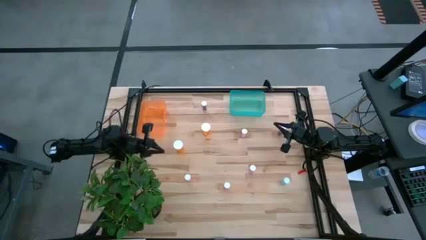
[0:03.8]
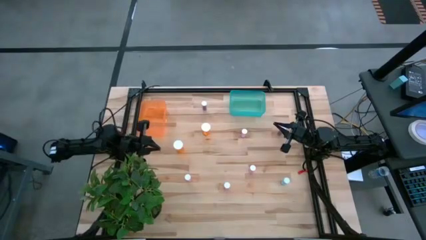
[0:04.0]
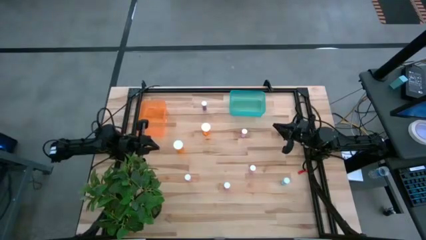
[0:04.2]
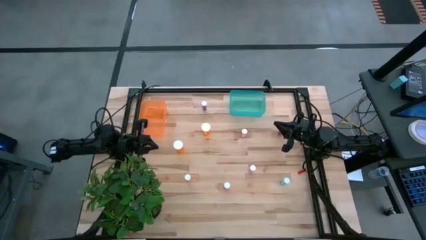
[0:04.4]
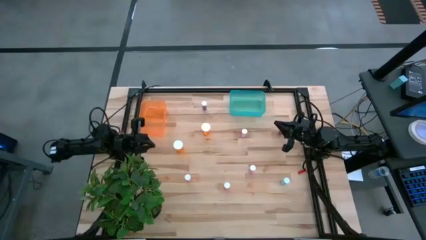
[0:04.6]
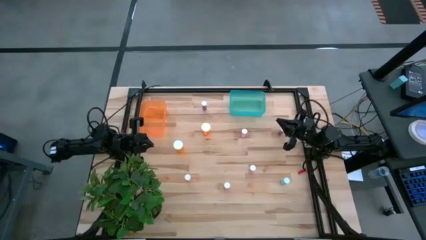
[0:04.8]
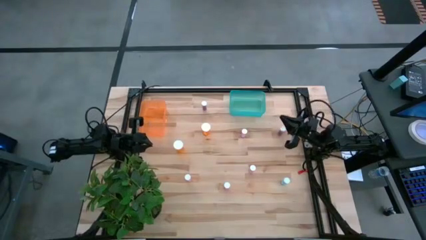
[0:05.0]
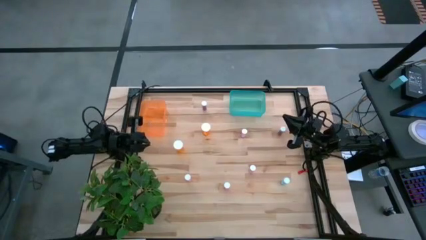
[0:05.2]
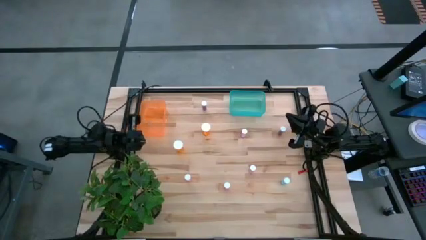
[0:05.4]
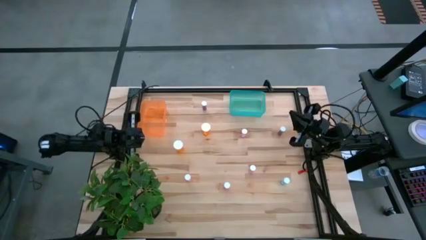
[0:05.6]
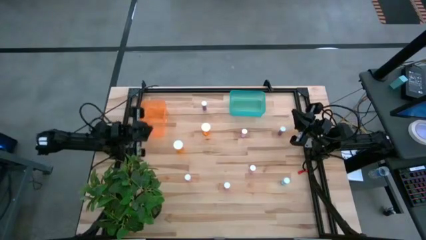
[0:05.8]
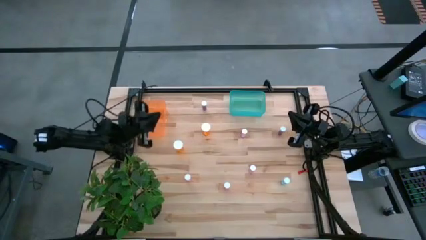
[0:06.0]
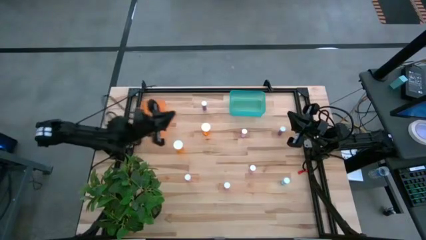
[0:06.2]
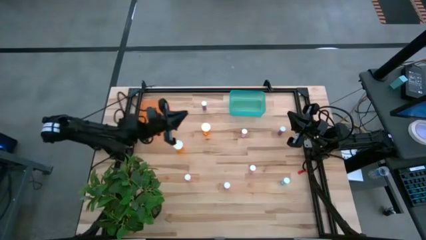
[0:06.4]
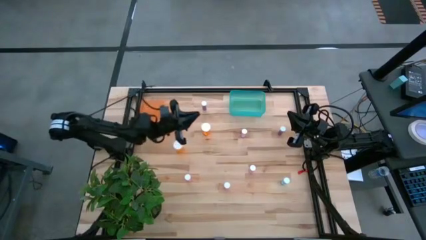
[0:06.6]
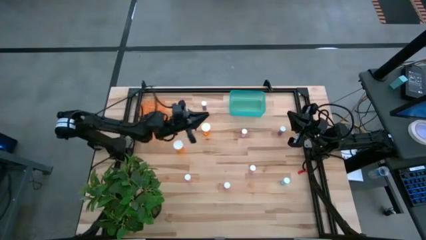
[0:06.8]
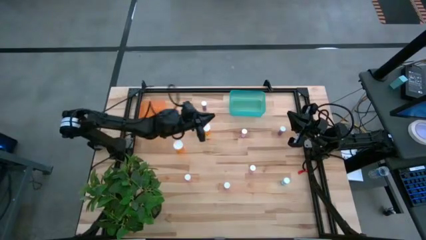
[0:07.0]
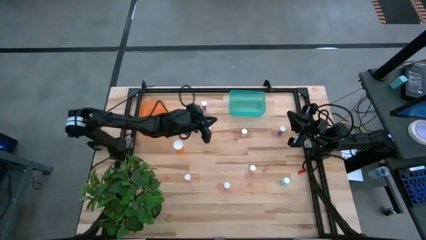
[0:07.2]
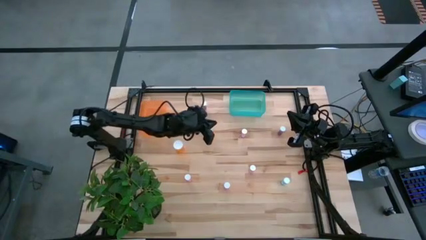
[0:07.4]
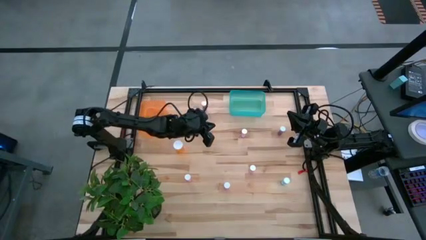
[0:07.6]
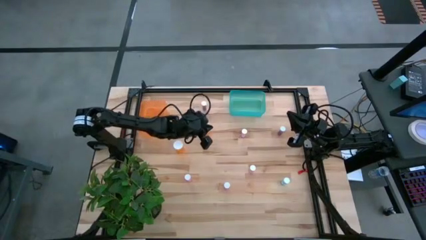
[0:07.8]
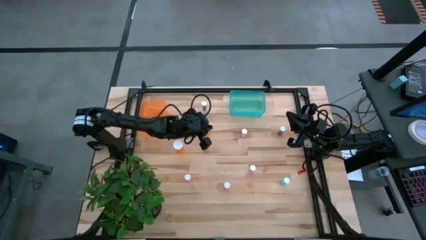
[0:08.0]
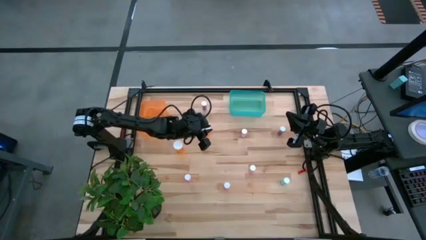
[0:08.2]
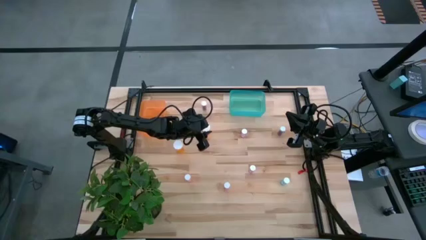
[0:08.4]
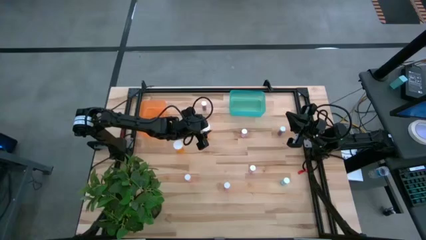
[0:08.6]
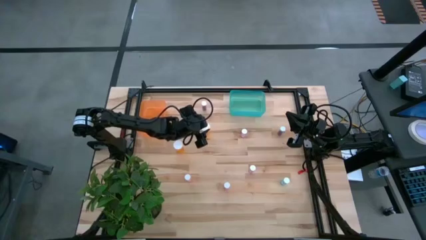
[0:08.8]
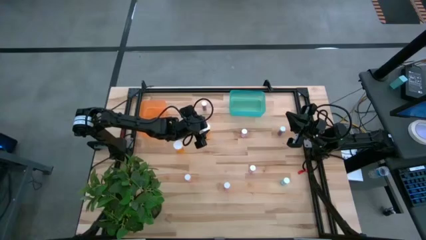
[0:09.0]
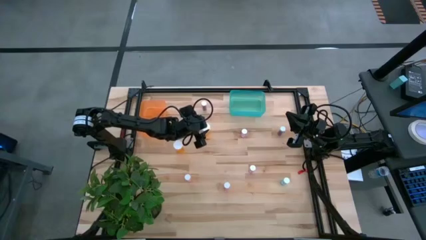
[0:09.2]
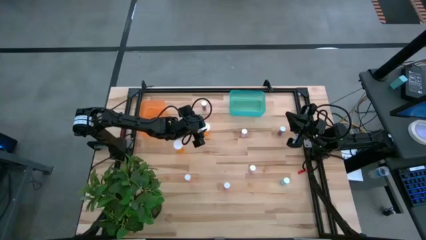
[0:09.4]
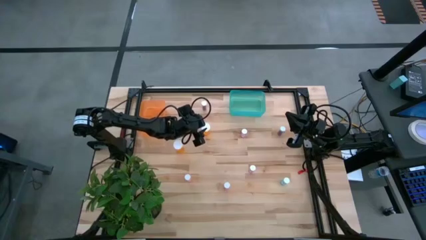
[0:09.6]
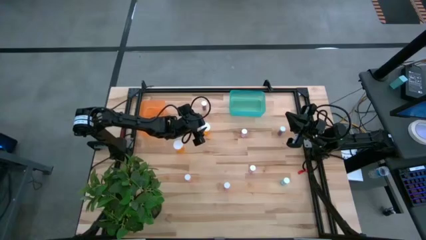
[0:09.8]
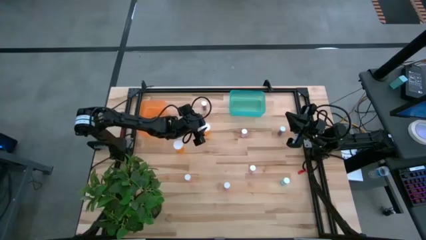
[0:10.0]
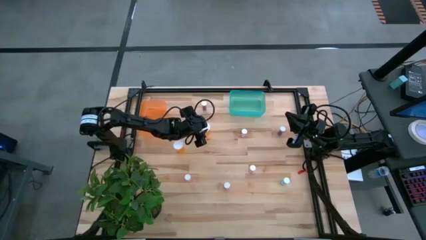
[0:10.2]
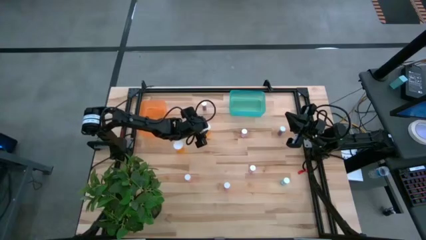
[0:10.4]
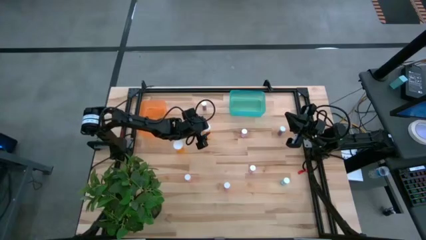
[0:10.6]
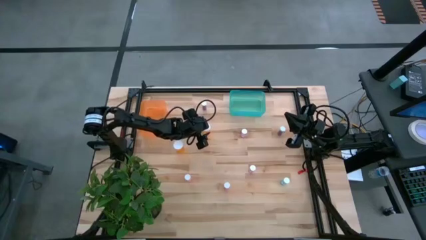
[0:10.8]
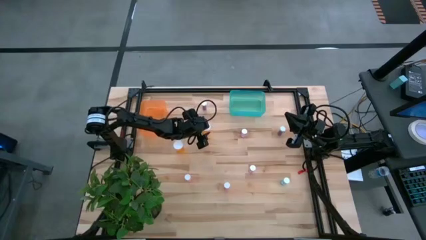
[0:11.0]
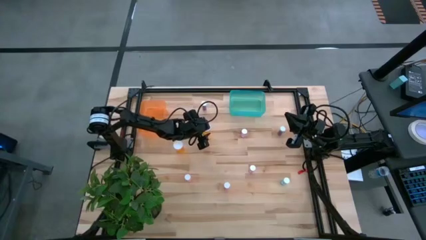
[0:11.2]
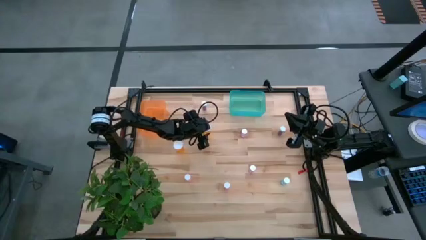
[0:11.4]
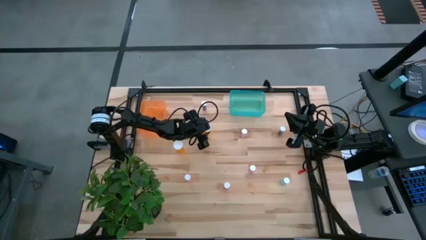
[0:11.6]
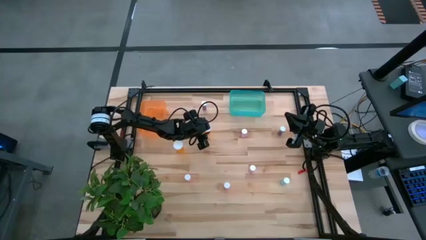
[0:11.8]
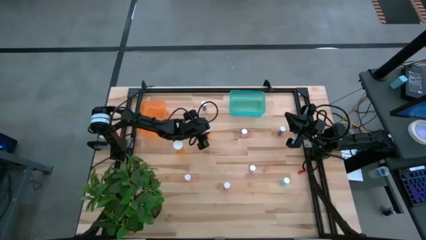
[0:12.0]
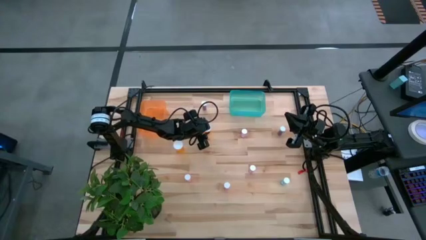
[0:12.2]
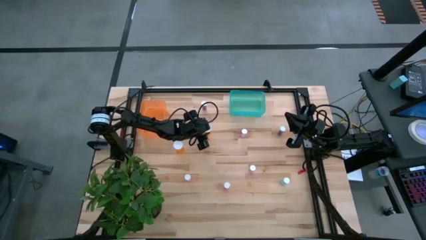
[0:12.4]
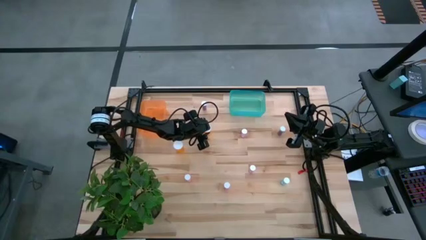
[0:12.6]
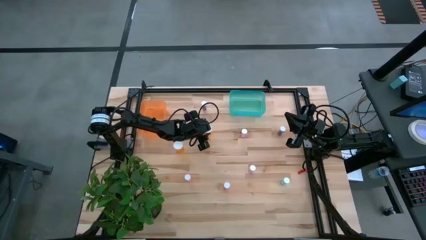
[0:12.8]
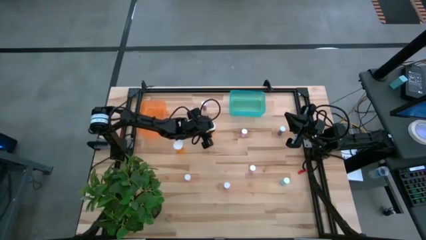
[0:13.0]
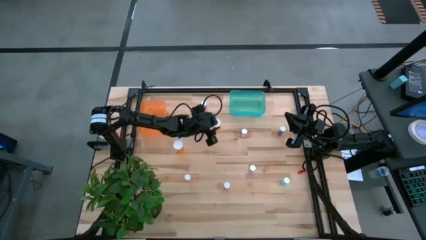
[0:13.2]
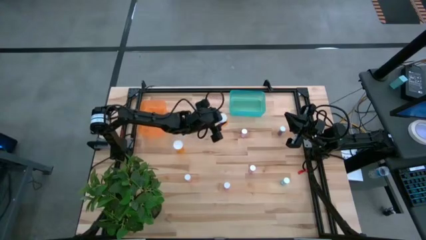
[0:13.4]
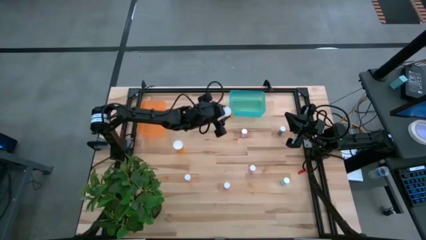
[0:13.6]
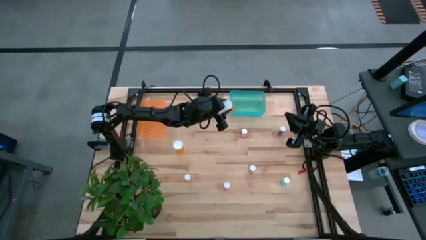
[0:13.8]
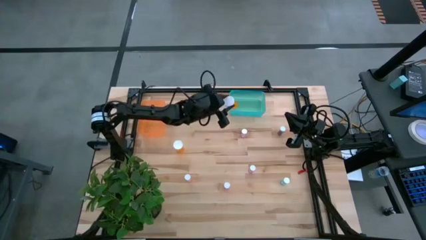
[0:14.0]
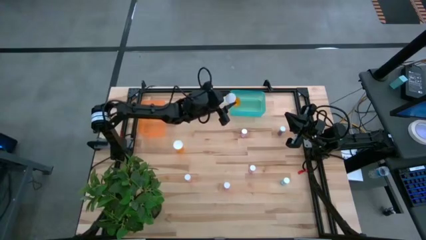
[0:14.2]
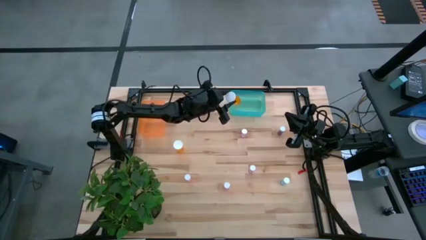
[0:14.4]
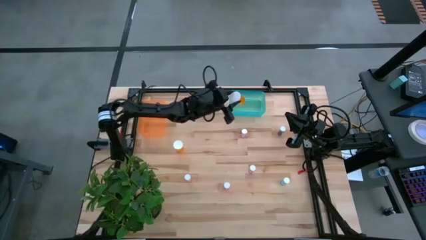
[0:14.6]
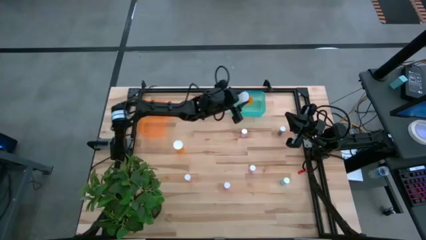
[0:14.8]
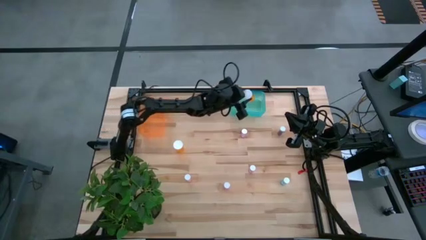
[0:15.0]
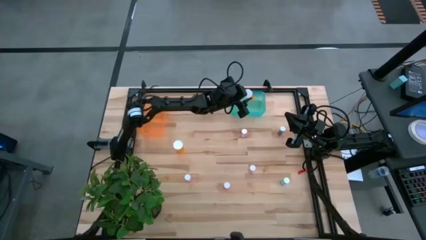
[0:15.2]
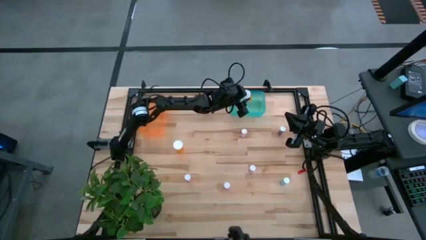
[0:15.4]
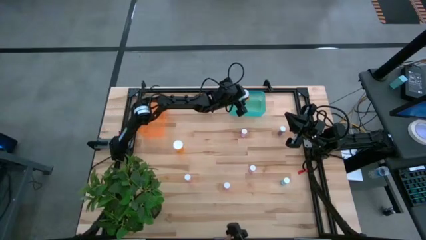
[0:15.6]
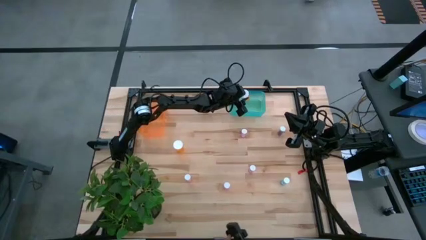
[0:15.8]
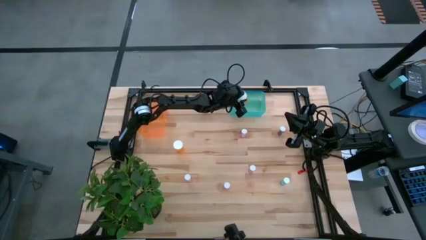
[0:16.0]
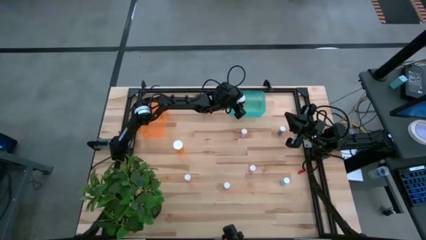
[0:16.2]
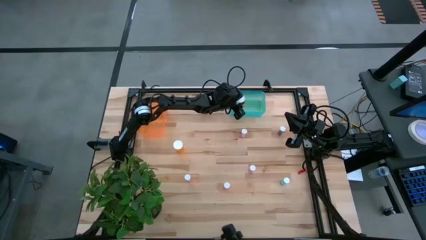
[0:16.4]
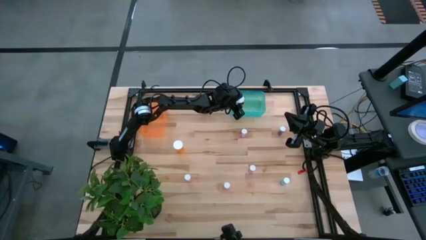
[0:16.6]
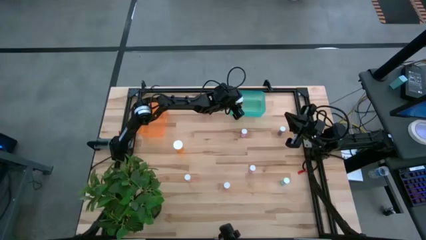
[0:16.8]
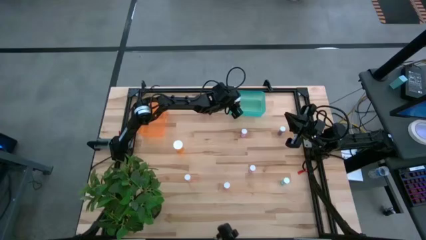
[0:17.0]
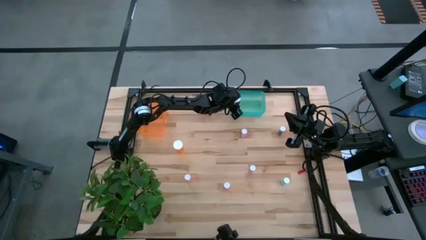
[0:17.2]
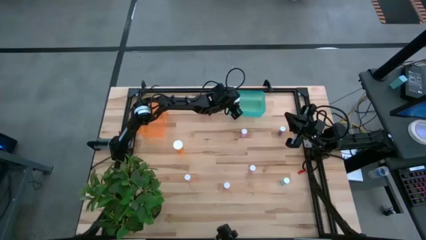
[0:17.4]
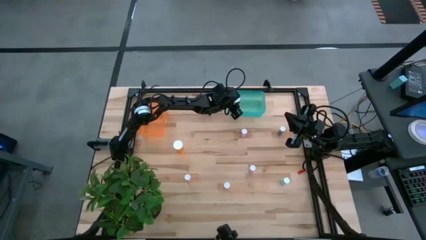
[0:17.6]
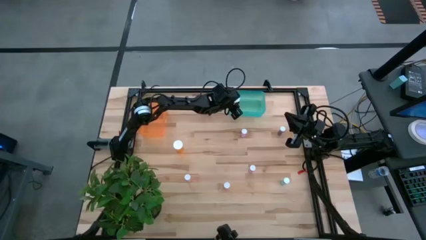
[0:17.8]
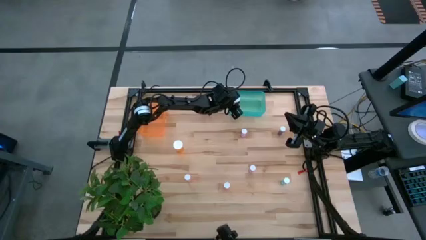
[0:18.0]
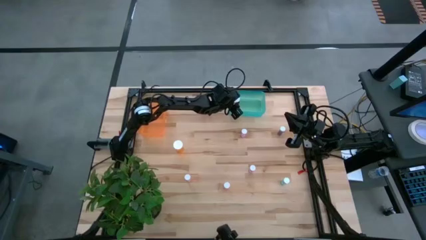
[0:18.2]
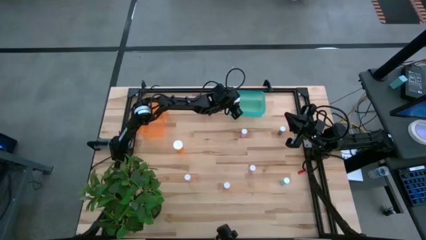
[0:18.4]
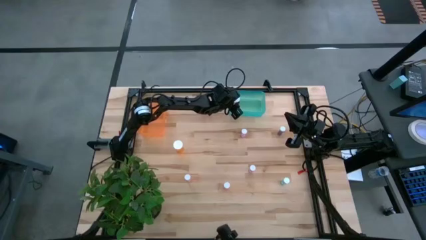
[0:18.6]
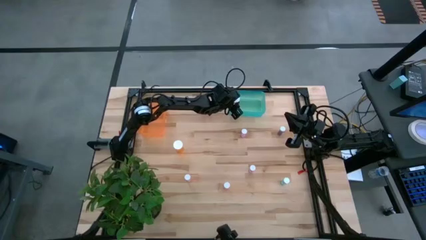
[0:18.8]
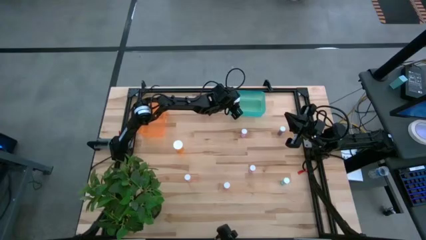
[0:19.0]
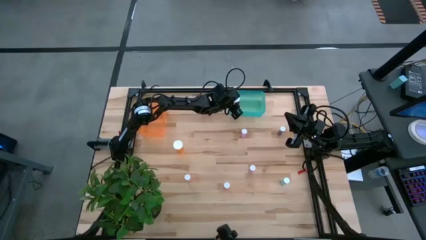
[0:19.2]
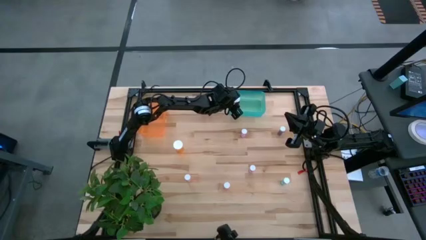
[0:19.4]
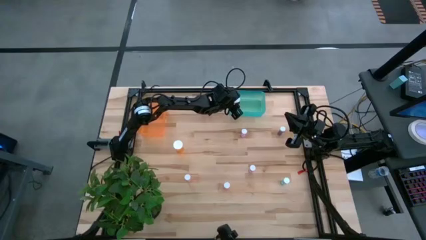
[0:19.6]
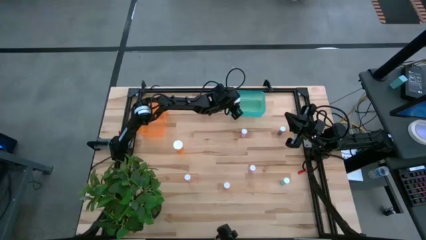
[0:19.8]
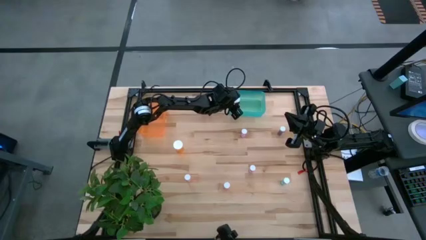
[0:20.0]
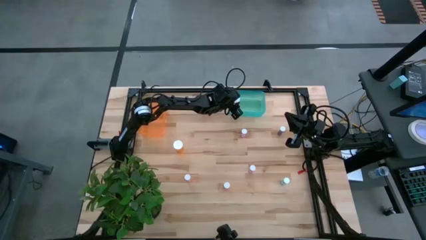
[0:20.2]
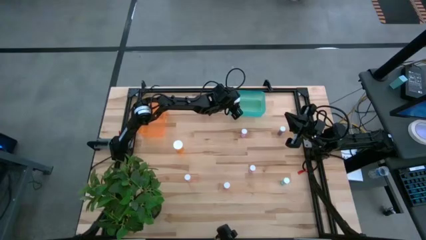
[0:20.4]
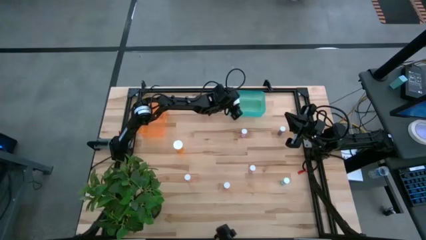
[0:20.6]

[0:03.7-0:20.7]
Task: Pick and place medicine bottles into bin by pill shape (circle, oval)
Put the orange capsule bottle into the green bin
